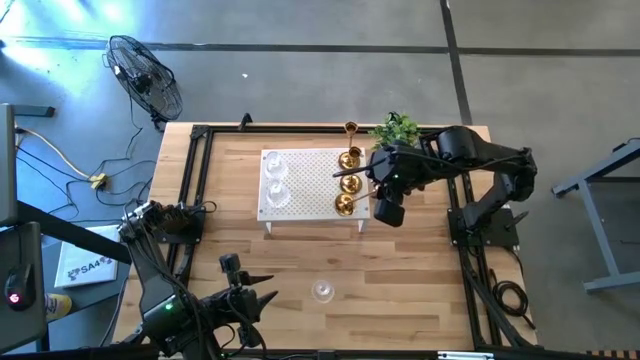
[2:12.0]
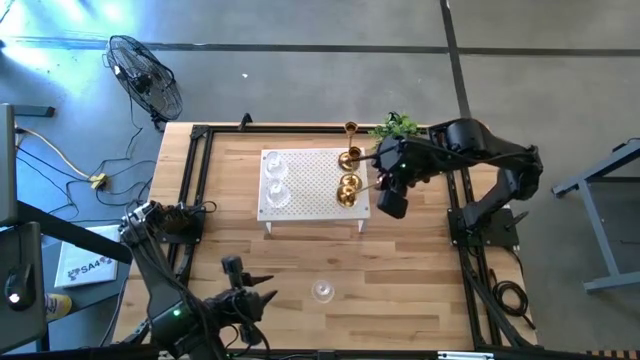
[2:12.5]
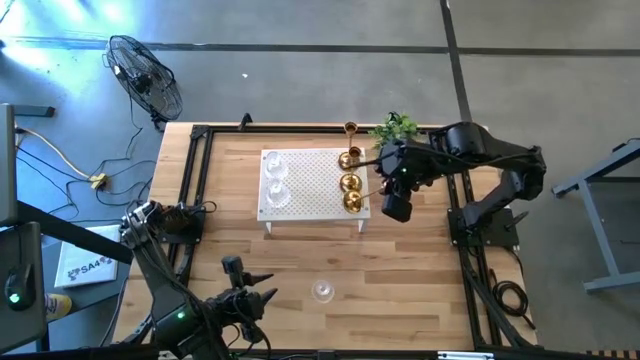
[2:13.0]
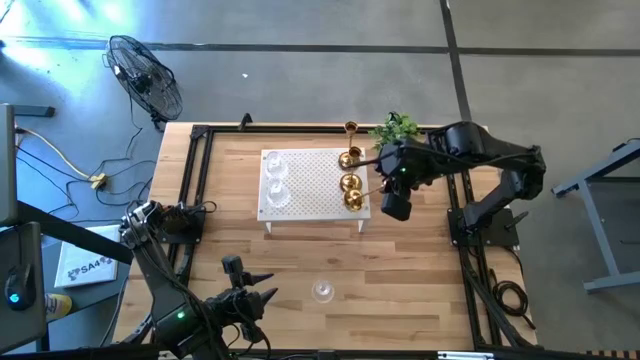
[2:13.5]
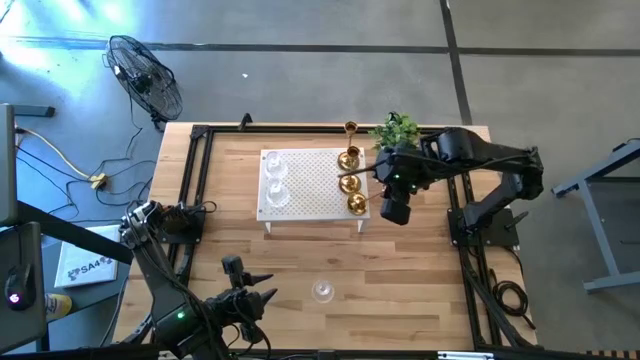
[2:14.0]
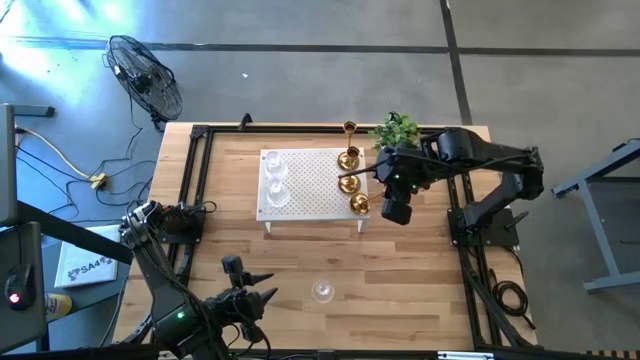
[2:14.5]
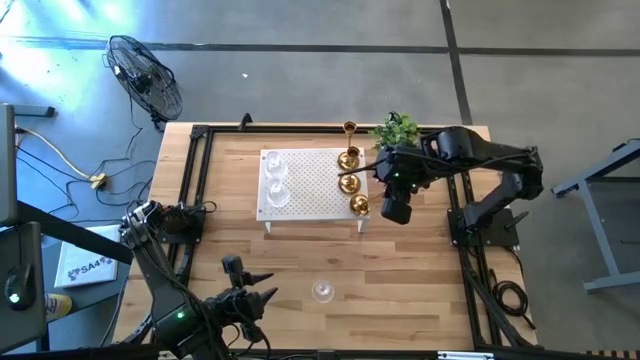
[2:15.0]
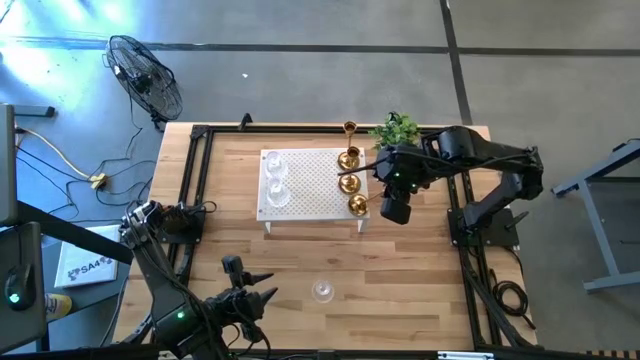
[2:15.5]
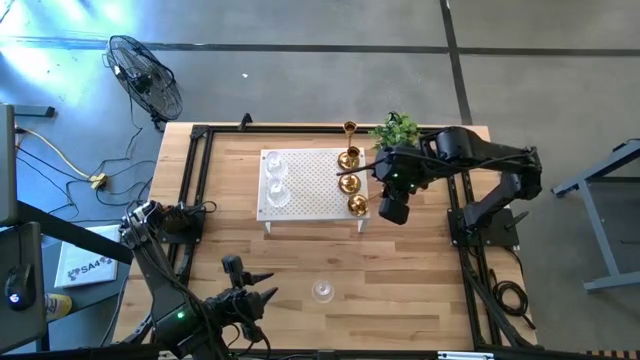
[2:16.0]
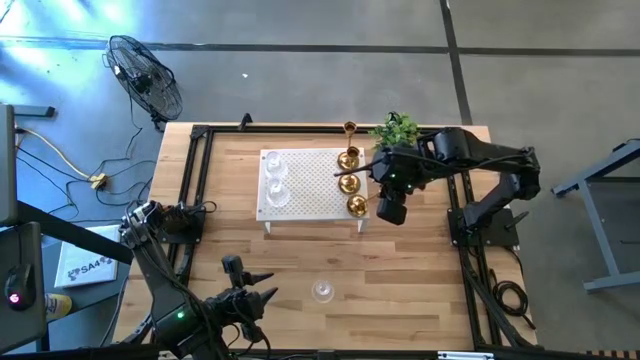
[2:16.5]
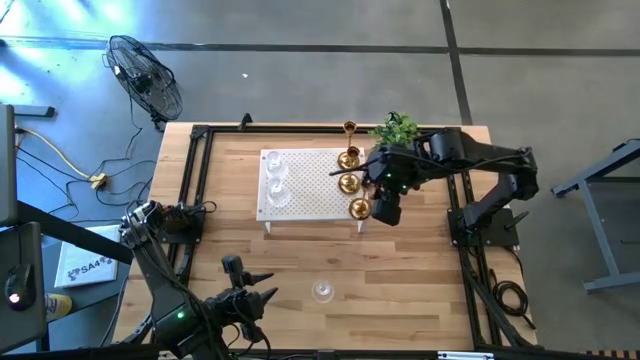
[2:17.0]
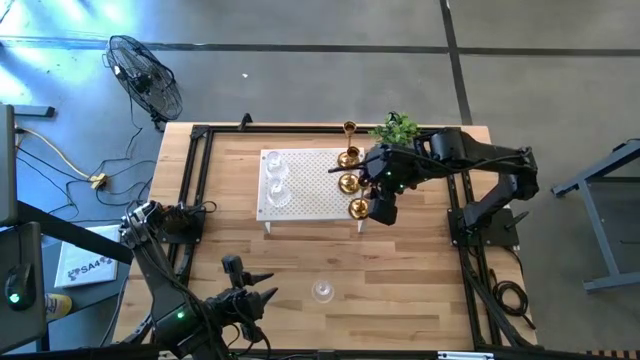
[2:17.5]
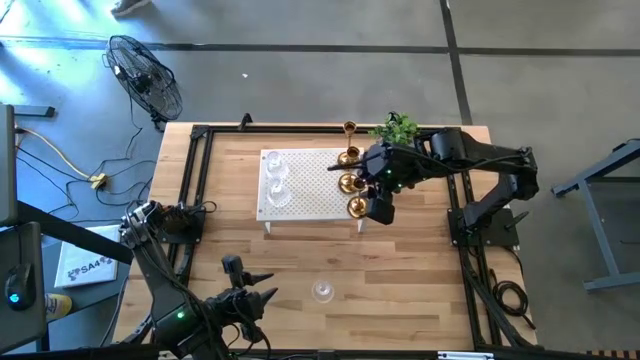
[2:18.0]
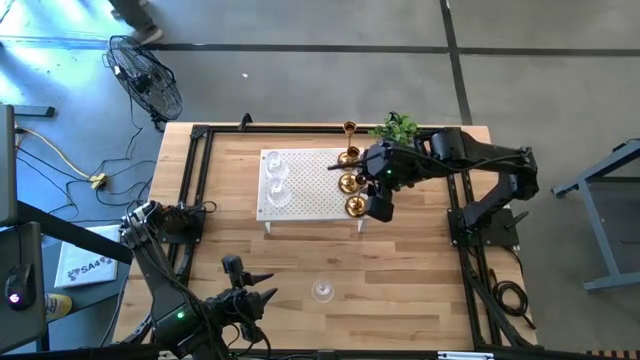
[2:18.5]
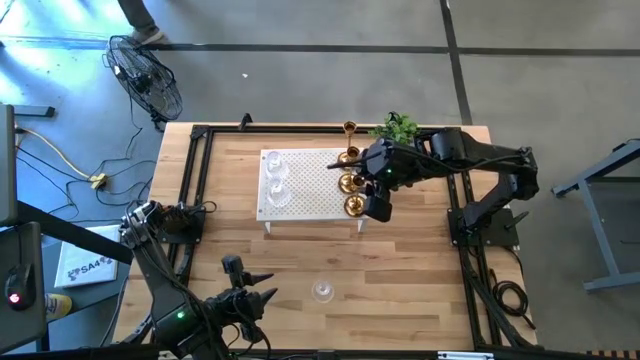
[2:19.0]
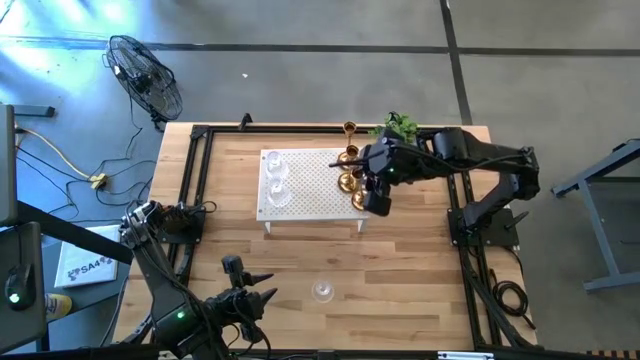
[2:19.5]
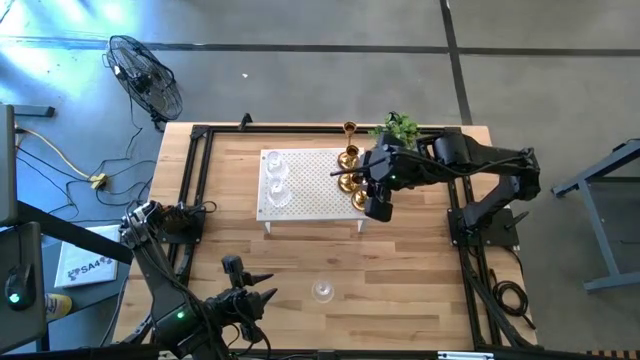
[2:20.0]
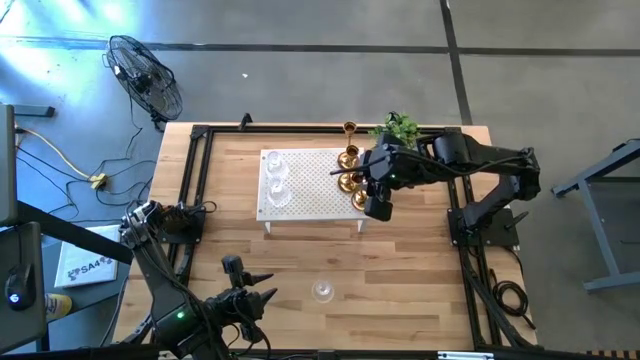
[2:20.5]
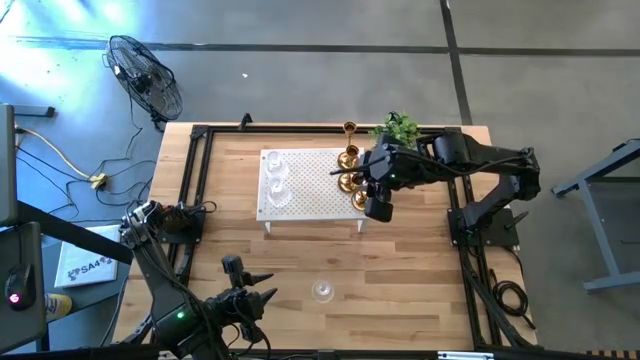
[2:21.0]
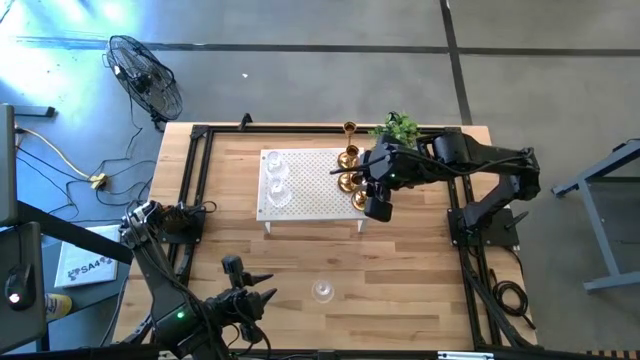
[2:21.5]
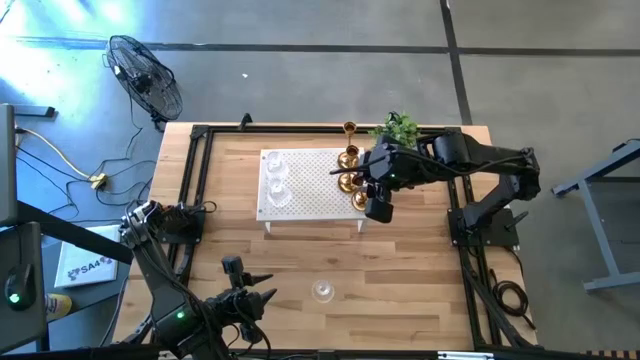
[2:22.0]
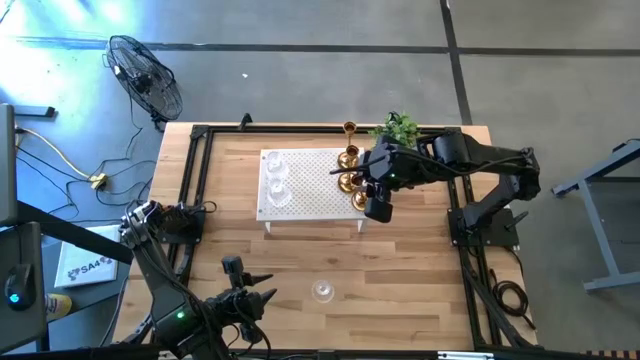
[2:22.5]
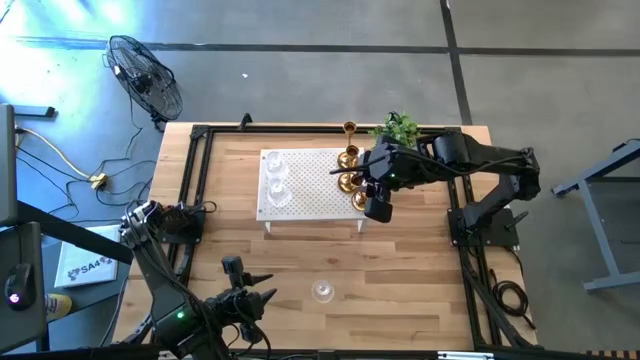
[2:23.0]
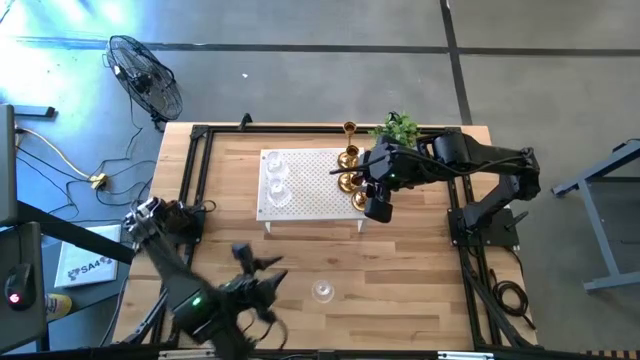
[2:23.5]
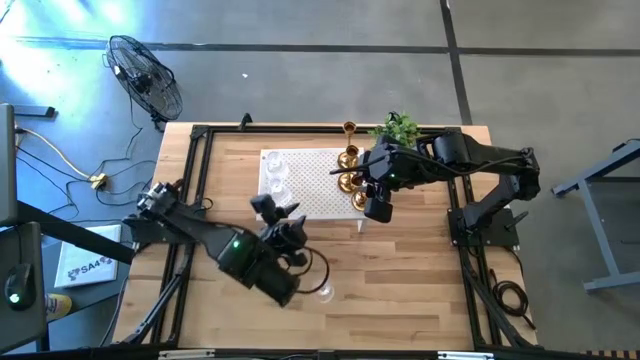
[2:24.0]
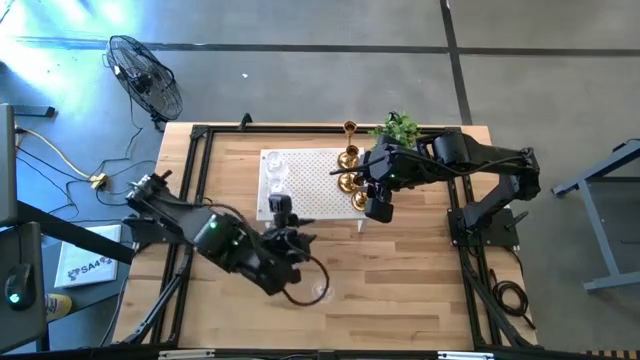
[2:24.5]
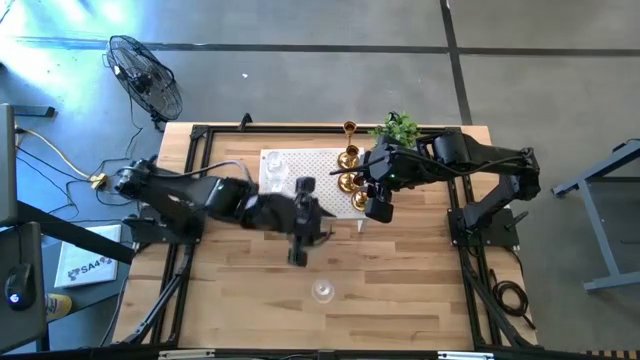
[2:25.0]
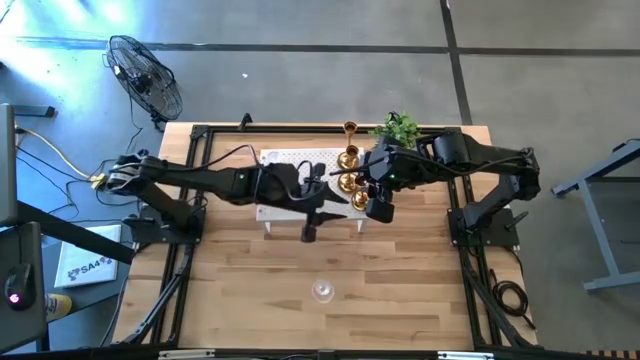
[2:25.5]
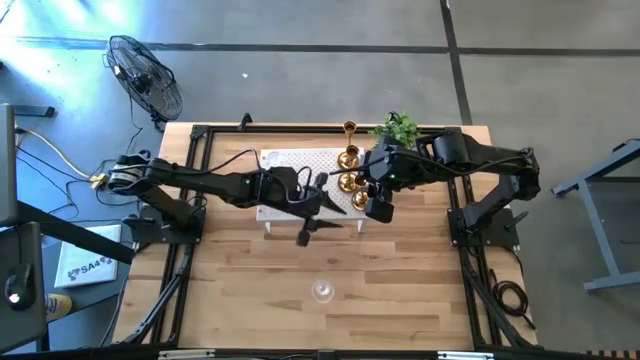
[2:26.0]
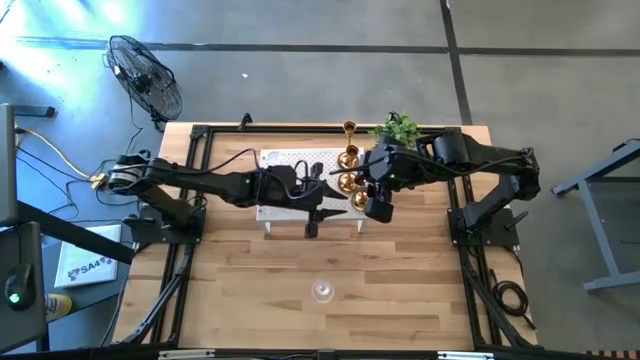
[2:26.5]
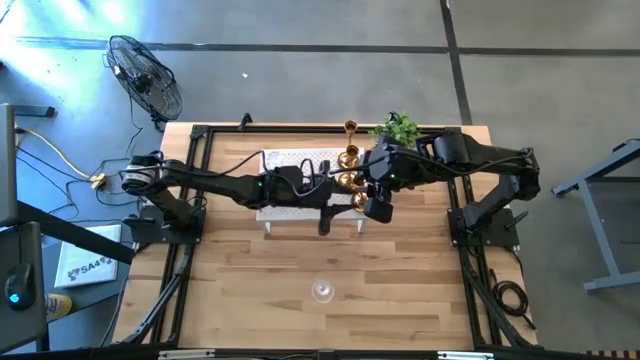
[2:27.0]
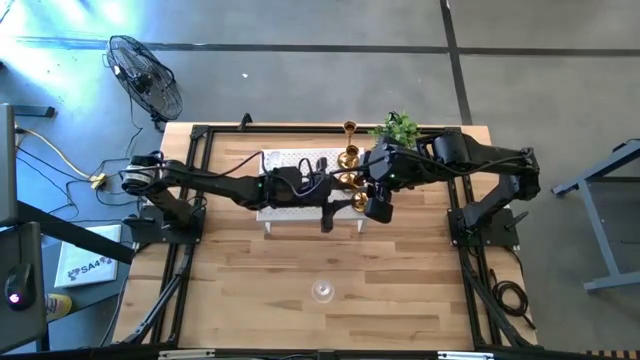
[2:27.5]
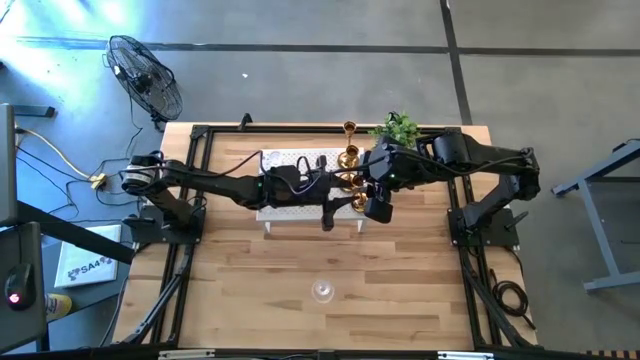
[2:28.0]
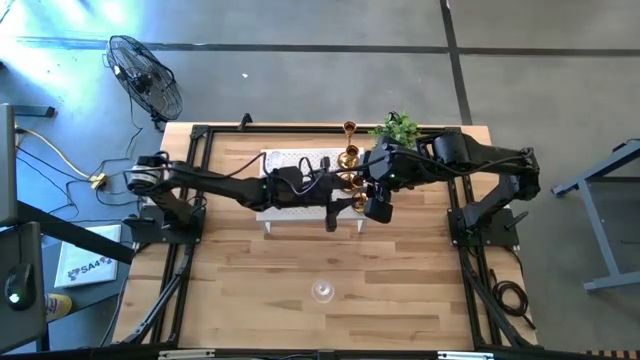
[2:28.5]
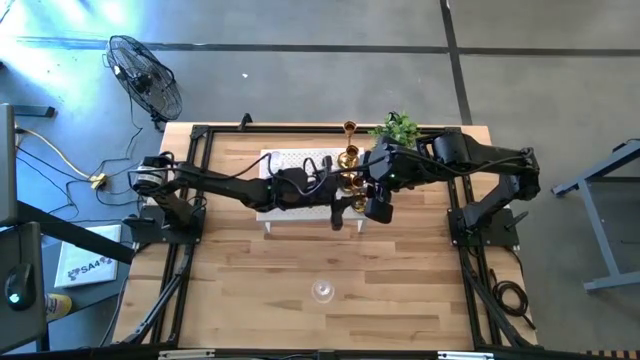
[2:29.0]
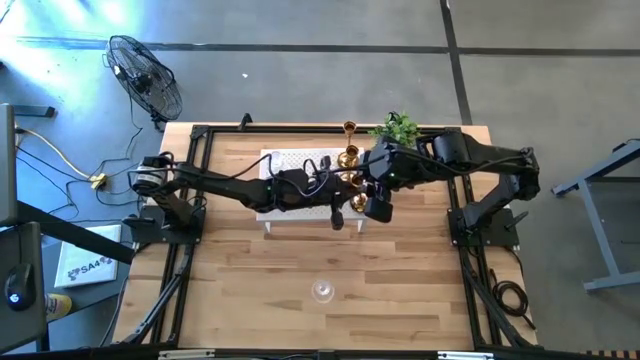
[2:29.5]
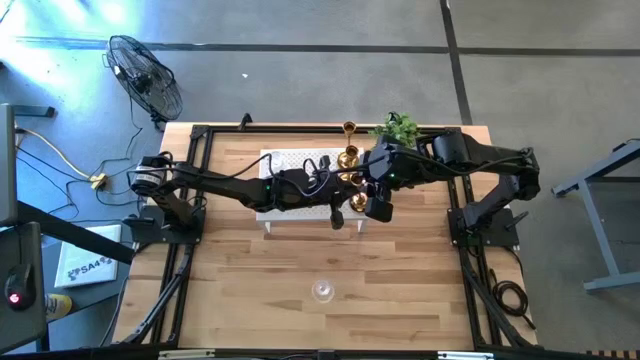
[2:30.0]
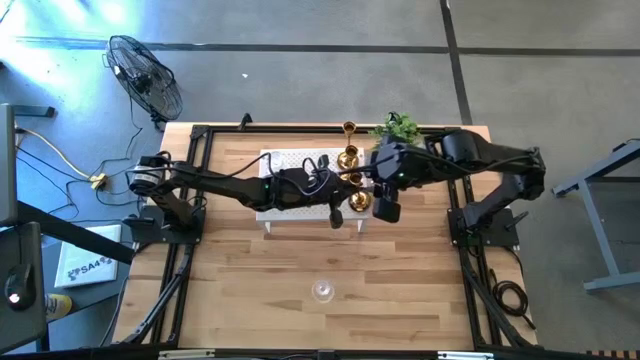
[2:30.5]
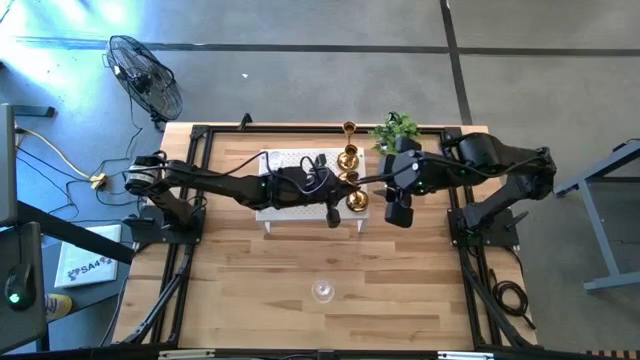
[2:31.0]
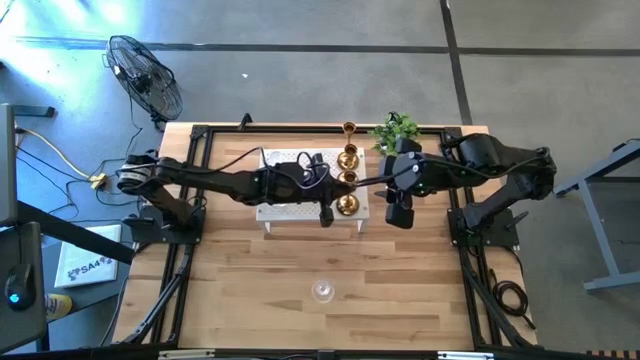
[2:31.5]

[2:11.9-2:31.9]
Task: Pick & Place candle stick holders
Put the gold candle holder on the shelf aligned with the other gold candle holders

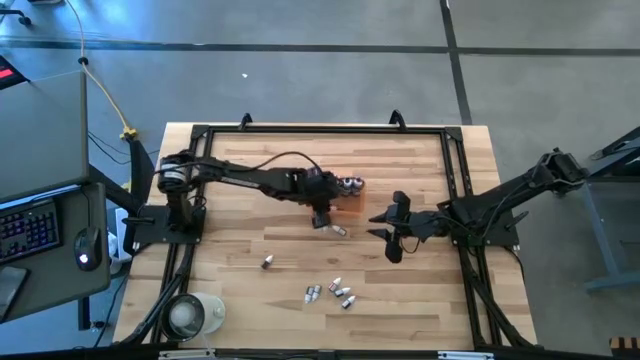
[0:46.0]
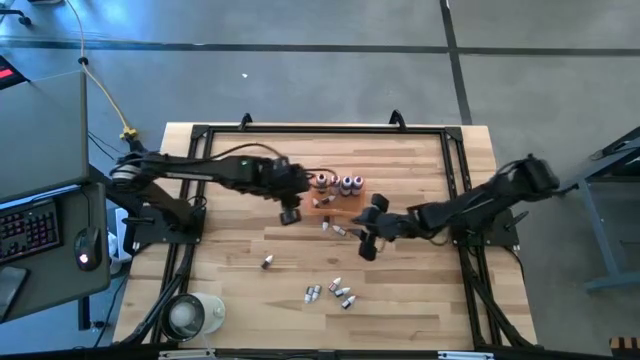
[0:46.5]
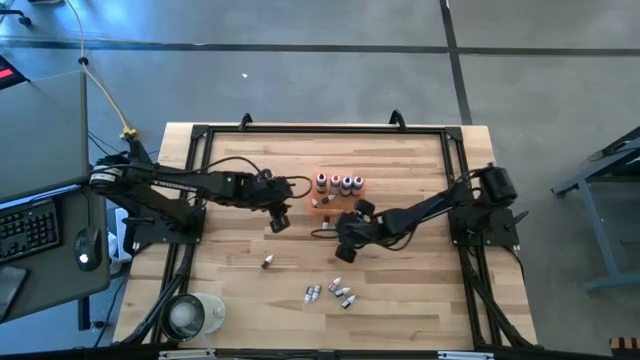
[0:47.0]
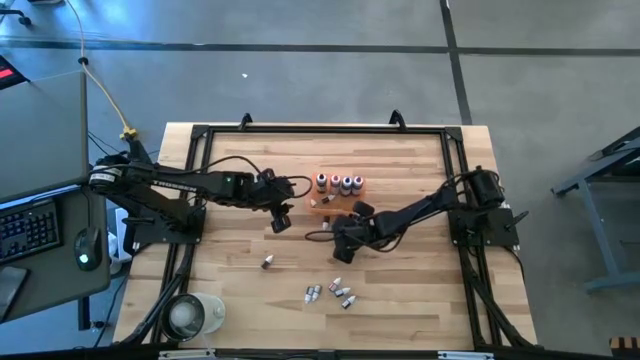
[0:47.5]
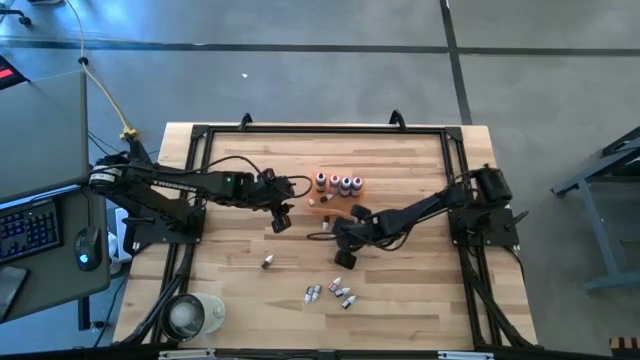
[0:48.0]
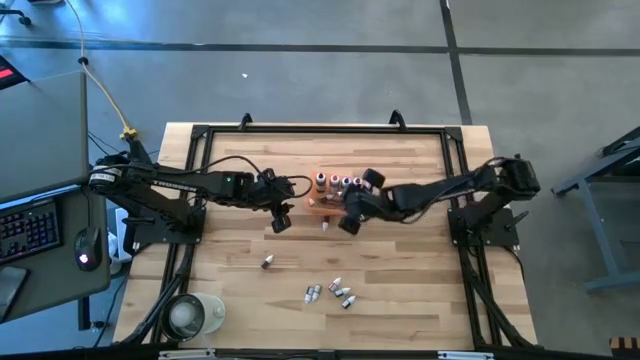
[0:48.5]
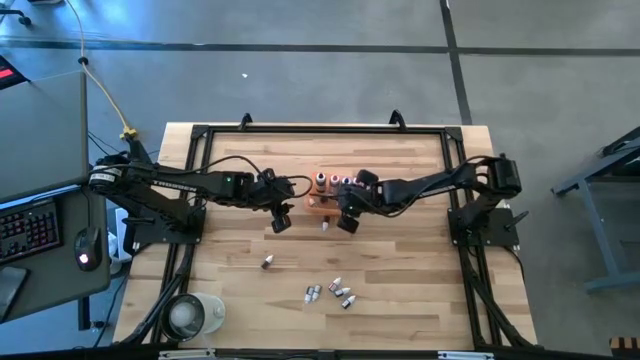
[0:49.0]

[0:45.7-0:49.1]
Task: Pick & Place food coloring
Put the small orange food coloring bottle into the orange bin
